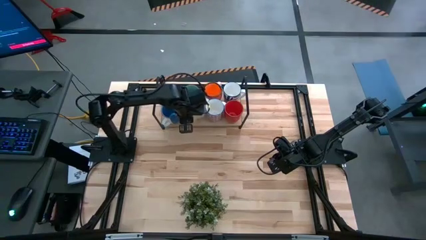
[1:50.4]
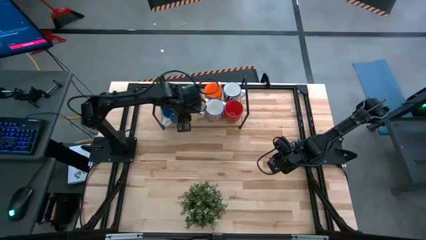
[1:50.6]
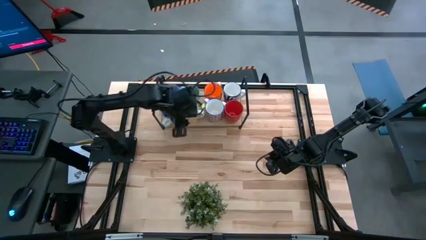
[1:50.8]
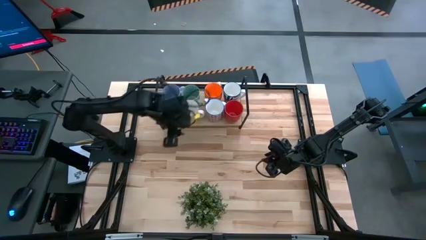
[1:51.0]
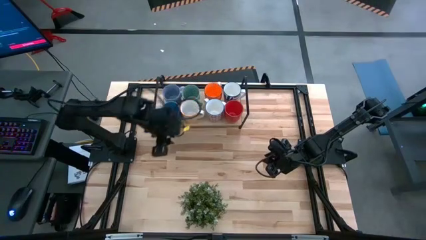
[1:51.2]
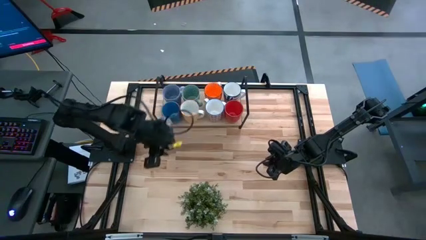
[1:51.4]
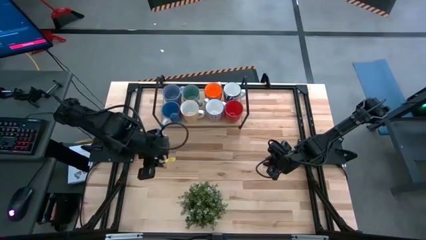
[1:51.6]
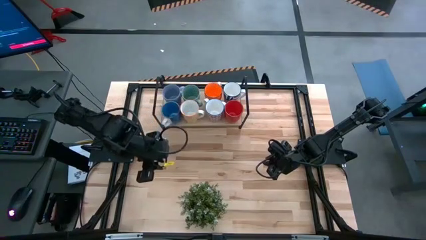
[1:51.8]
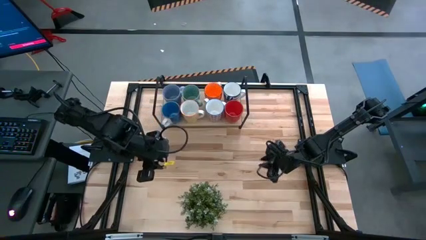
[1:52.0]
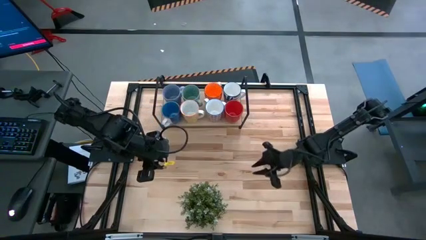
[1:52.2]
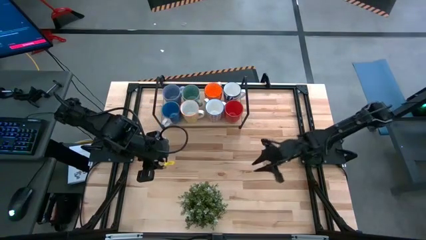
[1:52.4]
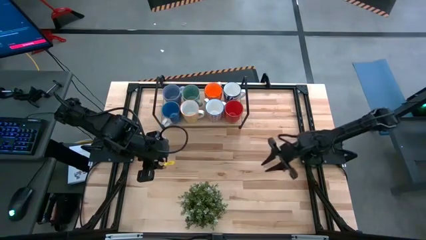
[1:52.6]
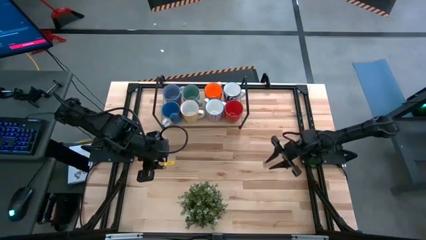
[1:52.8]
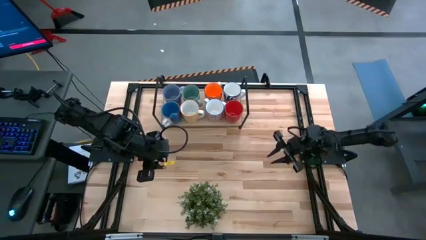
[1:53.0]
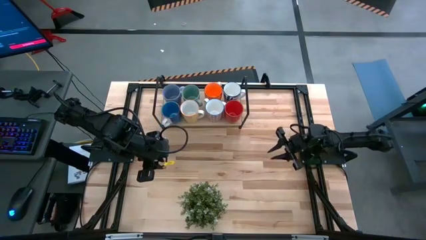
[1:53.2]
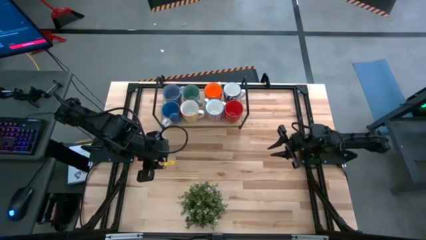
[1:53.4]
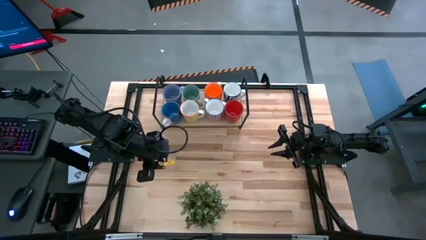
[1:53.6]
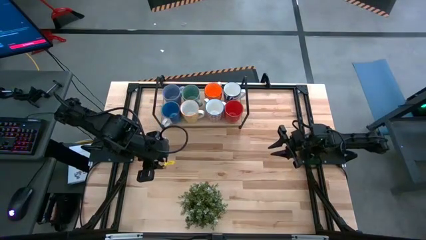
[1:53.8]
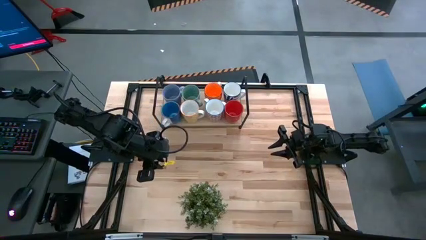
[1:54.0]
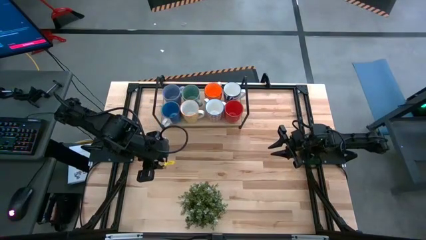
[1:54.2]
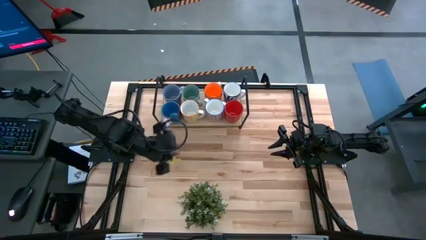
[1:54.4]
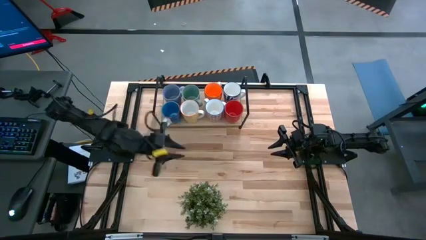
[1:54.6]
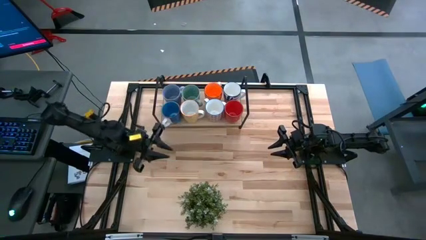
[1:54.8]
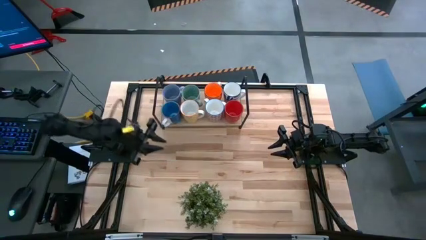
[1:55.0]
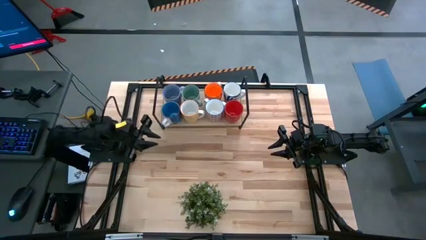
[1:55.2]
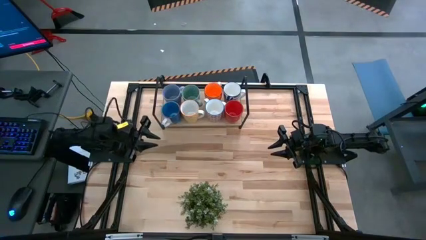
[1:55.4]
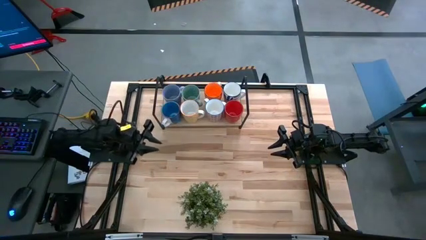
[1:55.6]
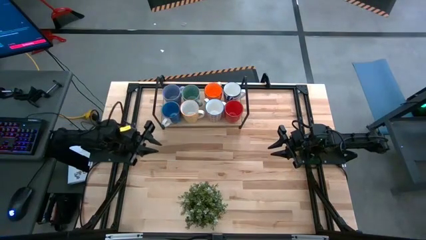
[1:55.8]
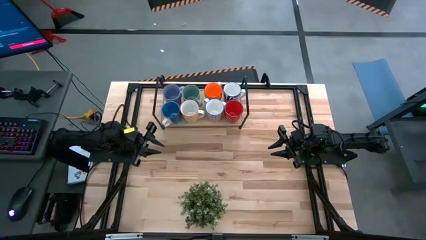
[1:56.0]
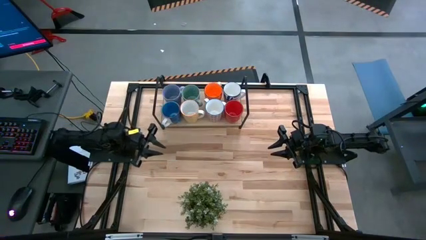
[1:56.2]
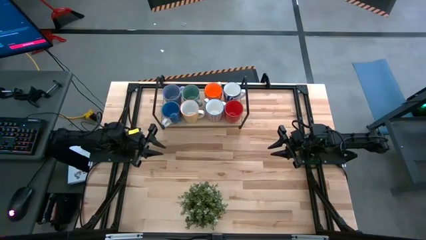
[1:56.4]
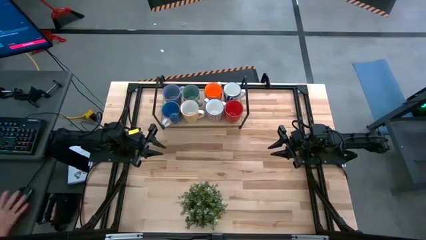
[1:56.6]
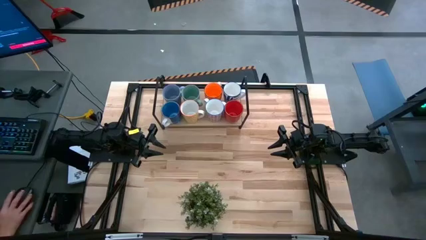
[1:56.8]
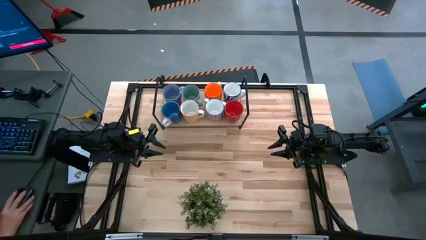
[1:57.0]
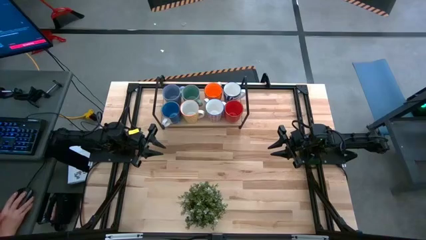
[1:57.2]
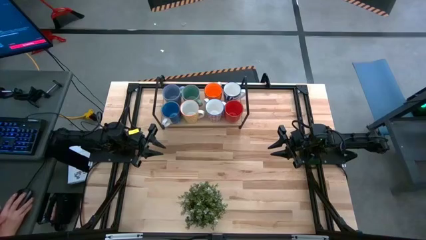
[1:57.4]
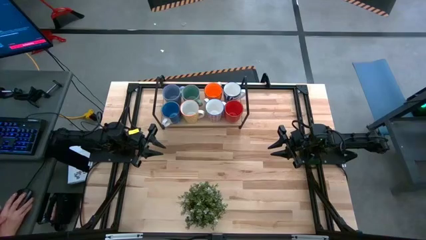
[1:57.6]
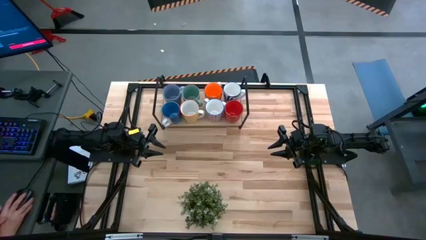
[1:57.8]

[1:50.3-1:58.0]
Task: Place coffee mugs
Return to Home Position

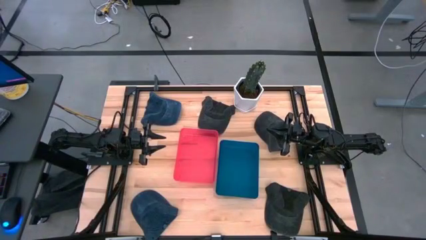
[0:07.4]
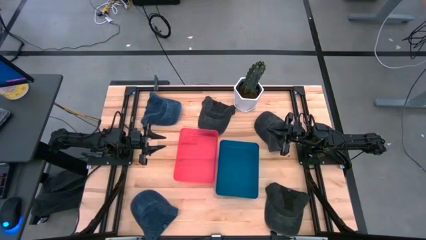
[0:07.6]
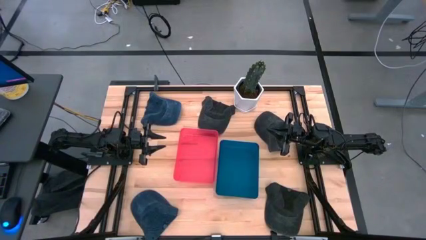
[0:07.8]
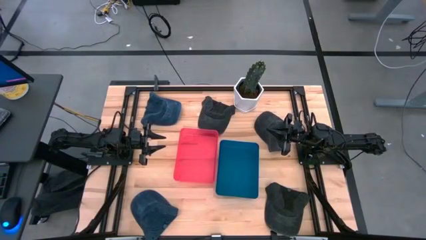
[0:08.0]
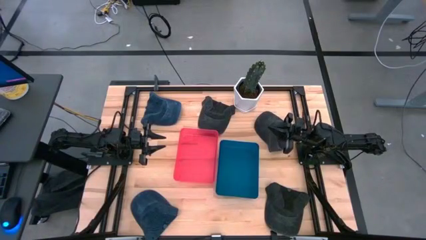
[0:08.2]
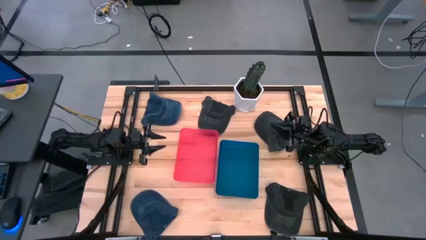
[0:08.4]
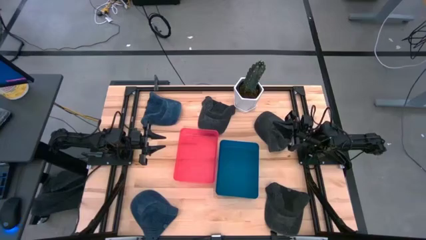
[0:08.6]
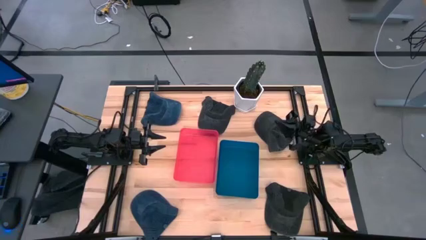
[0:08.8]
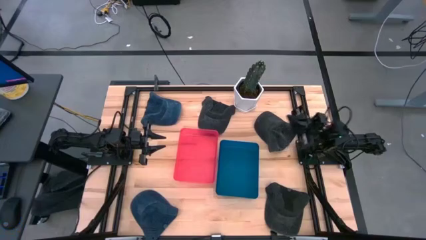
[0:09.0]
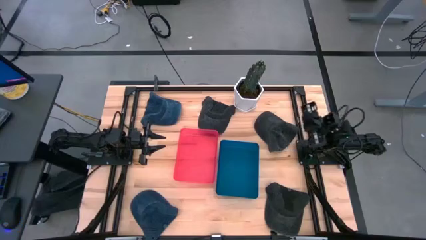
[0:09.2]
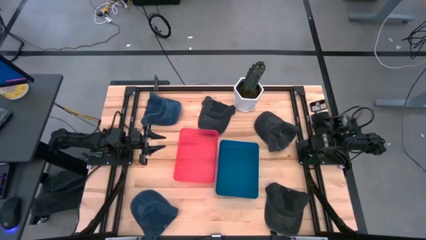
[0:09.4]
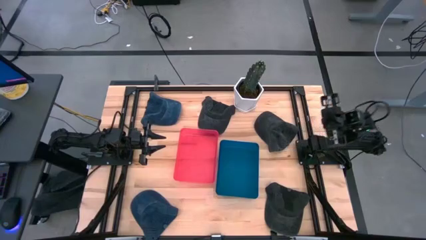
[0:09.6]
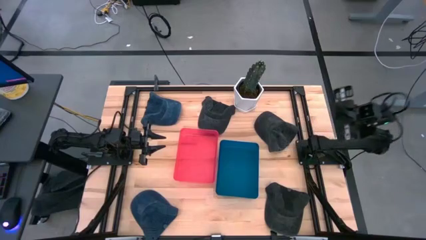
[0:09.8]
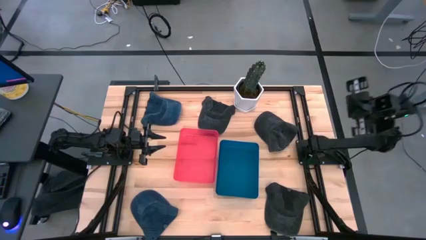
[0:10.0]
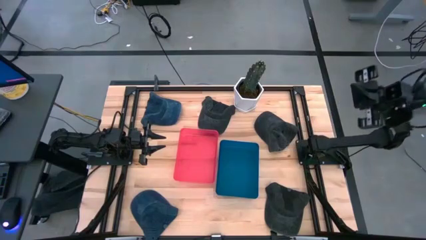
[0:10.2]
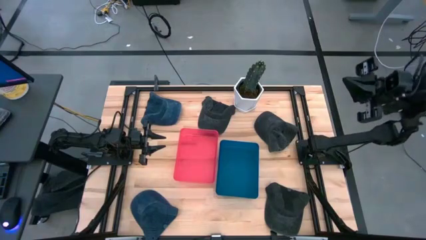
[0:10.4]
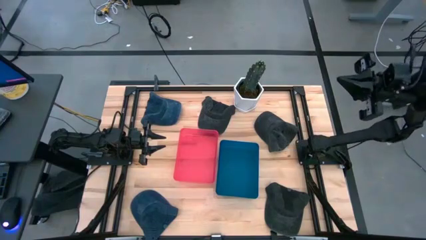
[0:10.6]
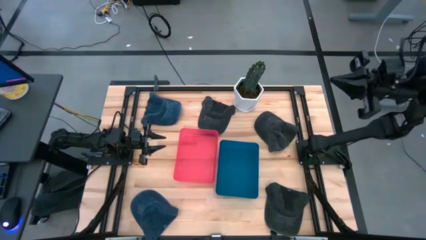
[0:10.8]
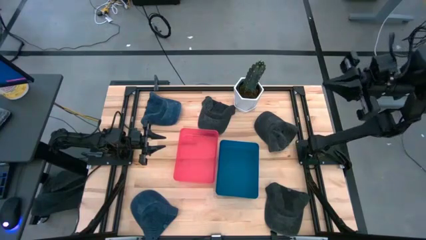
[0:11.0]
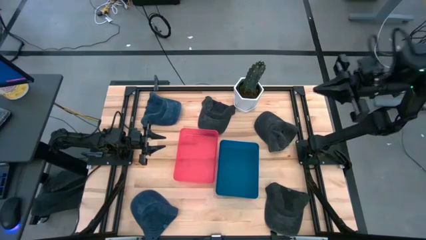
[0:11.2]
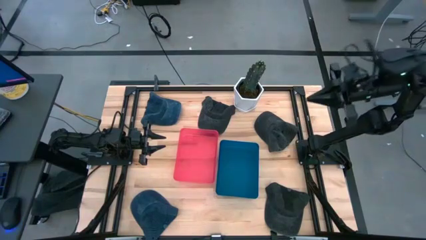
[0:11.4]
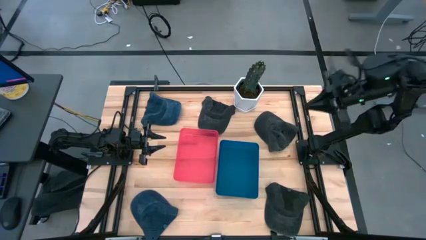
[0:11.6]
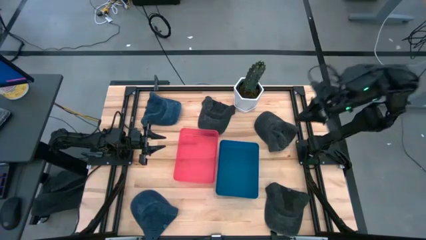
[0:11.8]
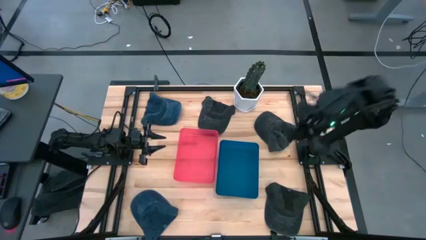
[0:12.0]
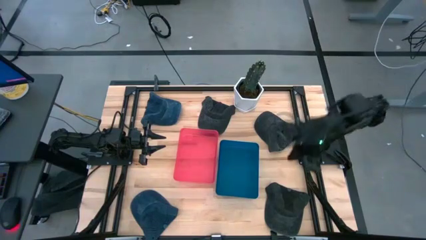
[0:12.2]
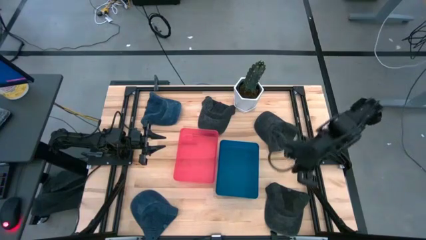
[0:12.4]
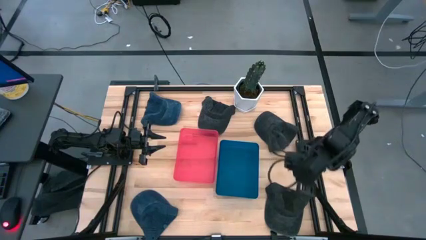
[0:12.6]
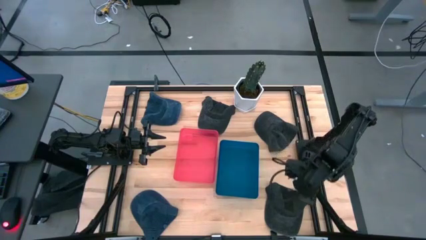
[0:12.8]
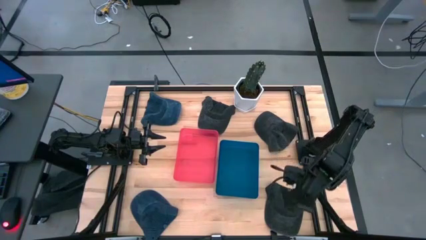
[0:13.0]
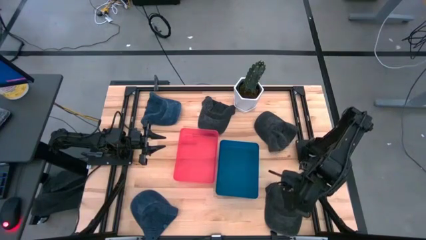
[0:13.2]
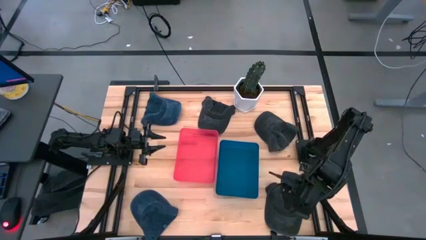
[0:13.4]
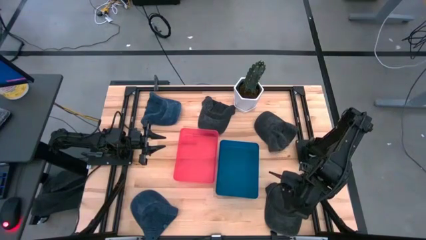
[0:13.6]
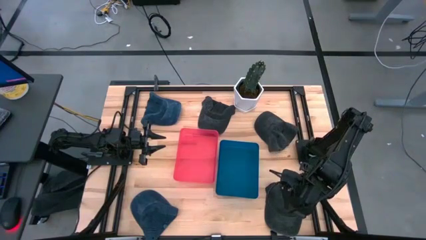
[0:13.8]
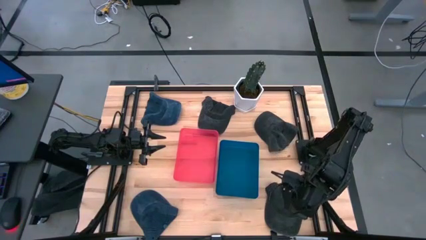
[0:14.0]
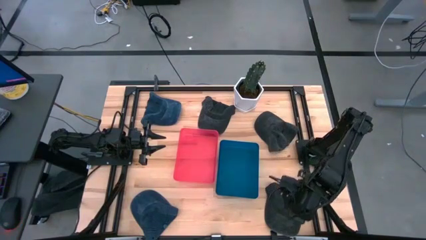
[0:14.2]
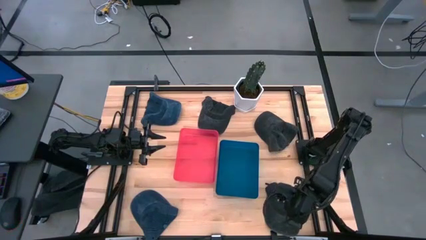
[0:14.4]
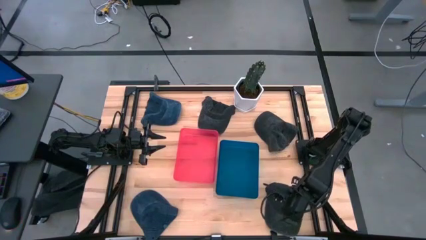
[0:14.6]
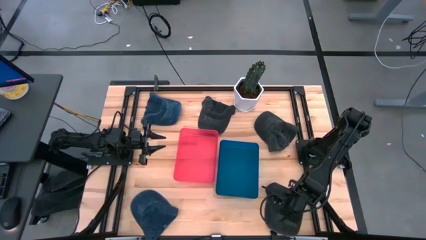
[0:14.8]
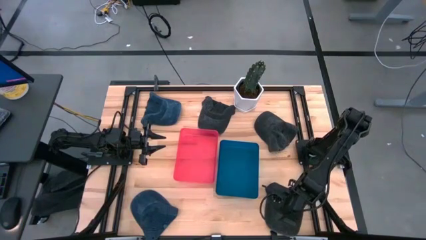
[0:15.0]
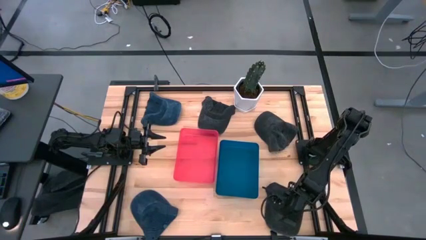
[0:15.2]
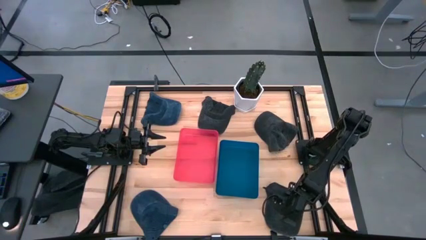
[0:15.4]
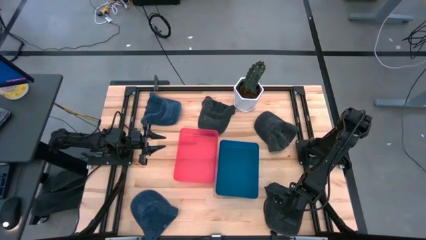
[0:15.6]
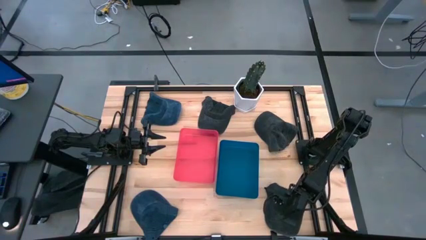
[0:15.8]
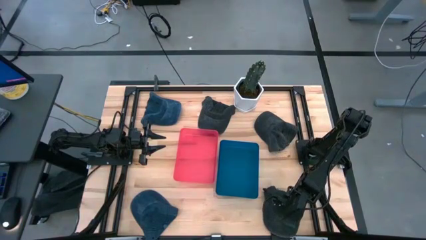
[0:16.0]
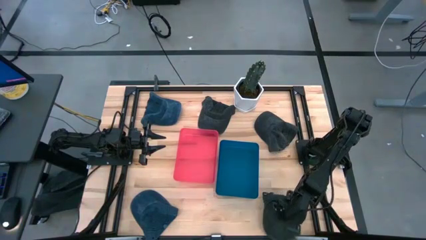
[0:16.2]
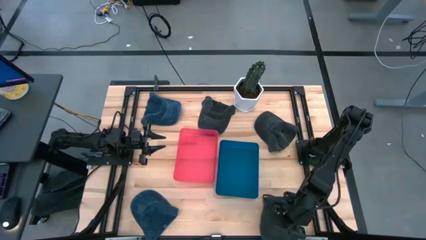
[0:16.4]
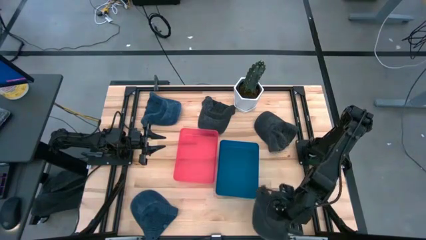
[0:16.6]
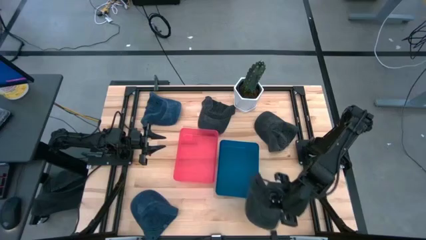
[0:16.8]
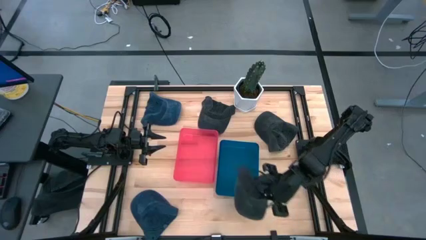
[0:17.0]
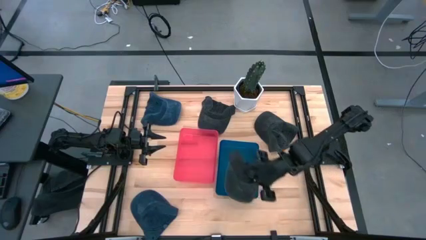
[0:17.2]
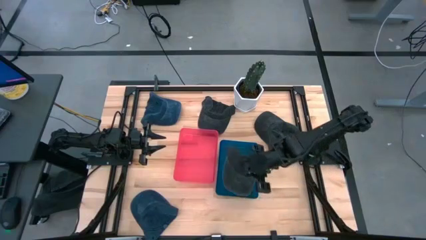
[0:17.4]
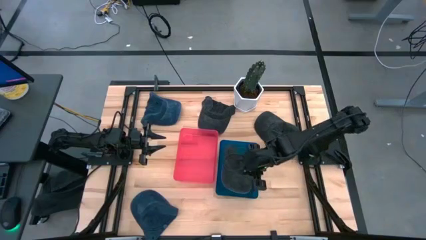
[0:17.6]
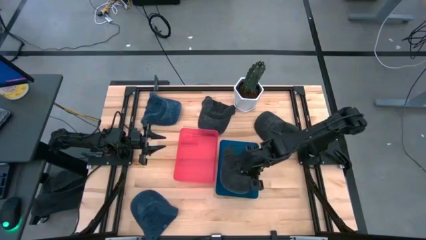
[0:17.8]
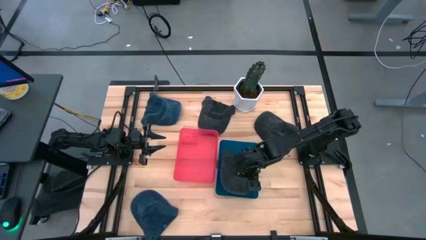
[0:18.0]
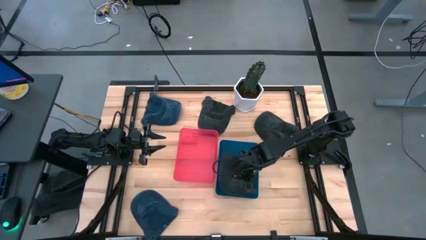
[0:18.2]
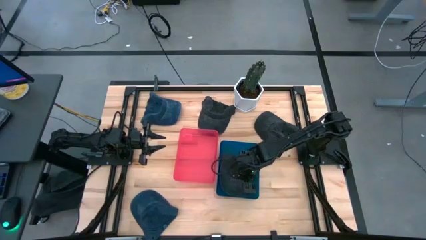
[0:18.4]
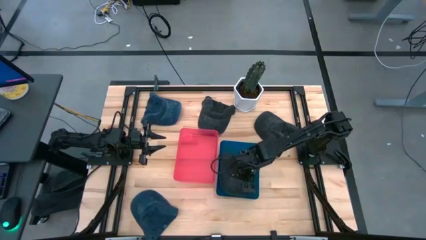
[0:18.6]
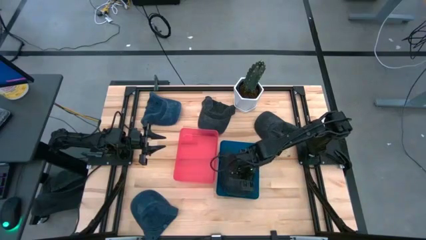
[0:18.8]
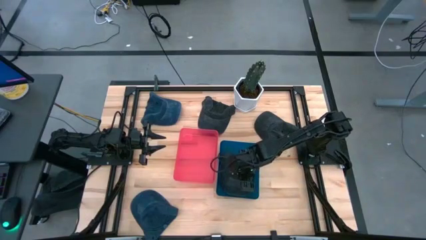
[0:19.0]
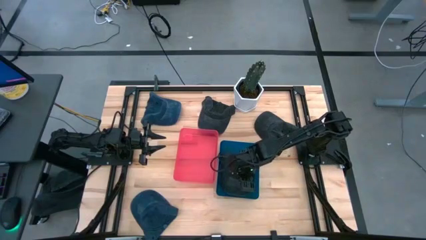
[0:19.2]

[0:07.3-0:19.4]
Task: Pick & Place hat
Put the bottom black cap into the blue bin
